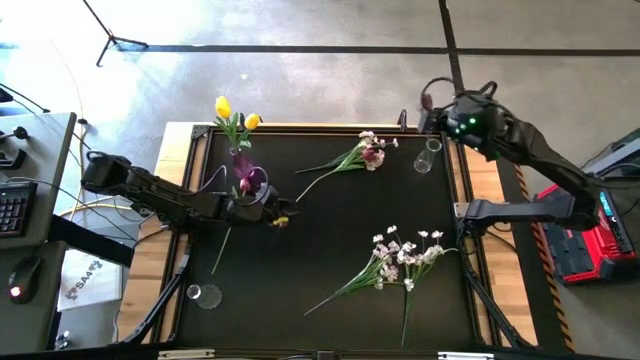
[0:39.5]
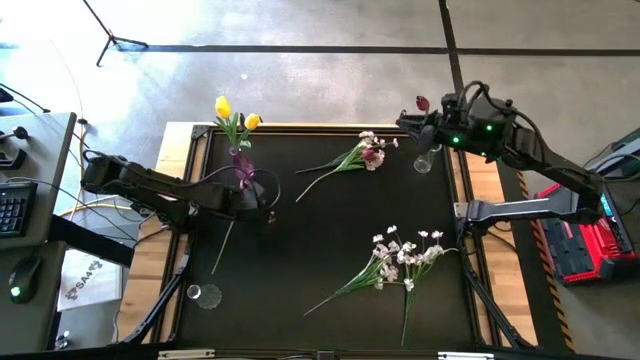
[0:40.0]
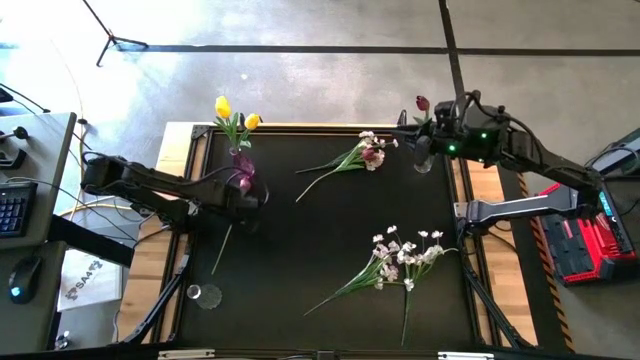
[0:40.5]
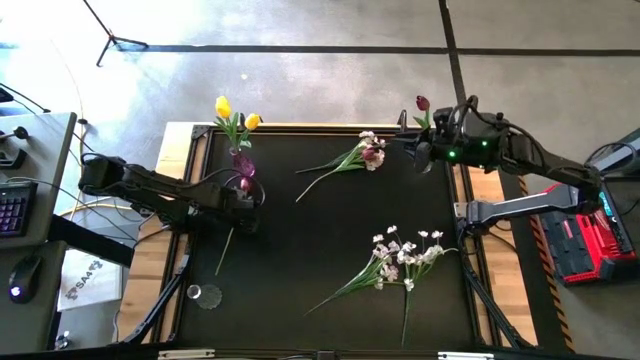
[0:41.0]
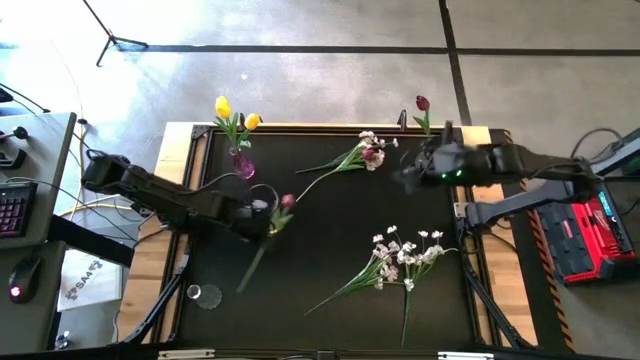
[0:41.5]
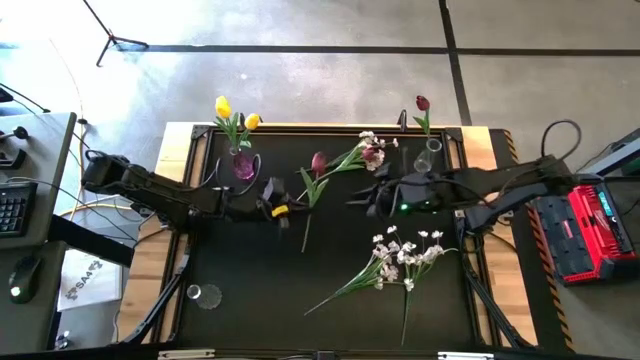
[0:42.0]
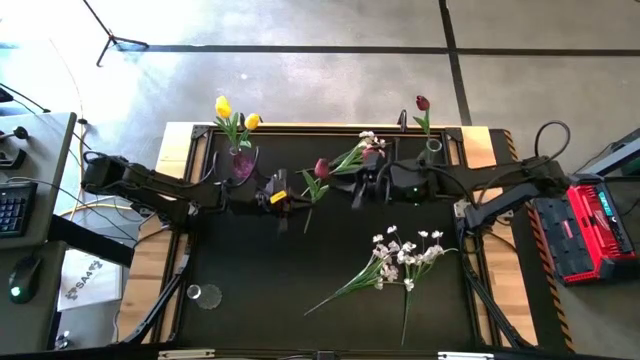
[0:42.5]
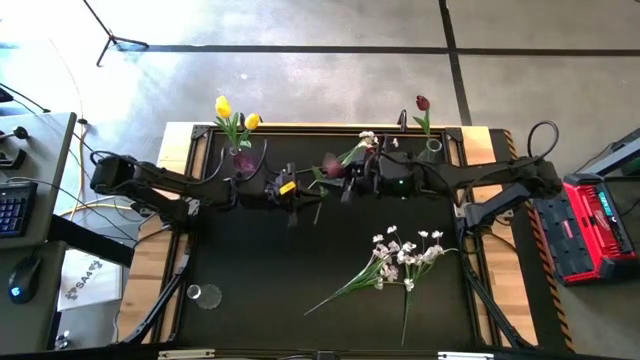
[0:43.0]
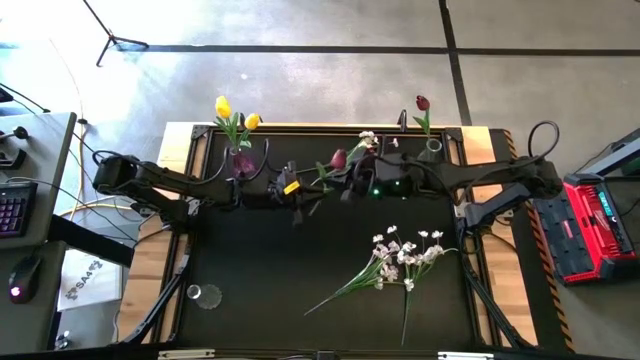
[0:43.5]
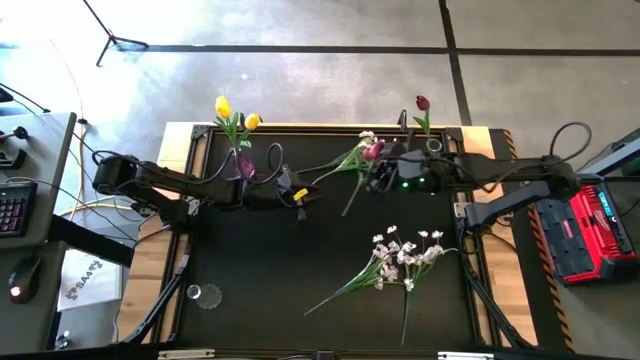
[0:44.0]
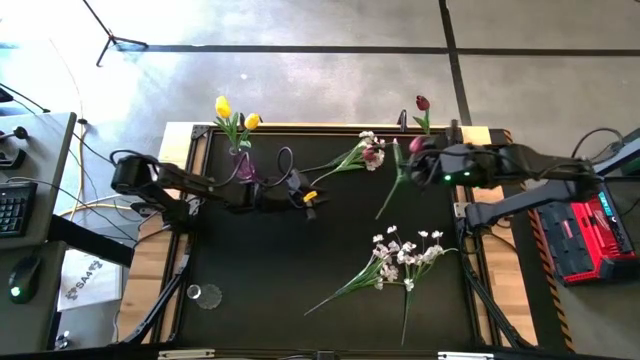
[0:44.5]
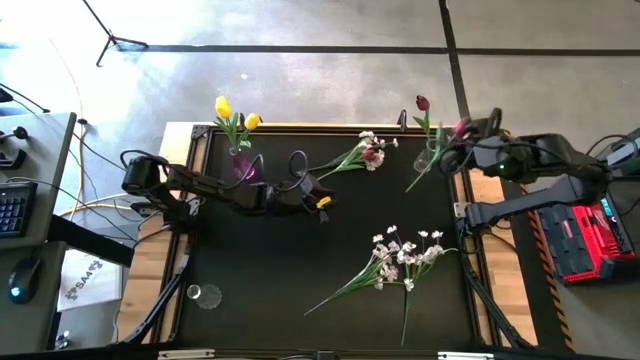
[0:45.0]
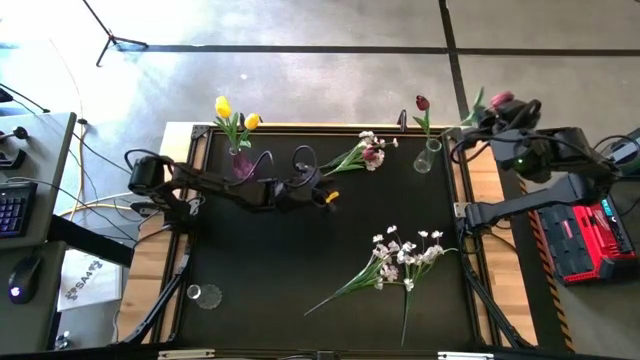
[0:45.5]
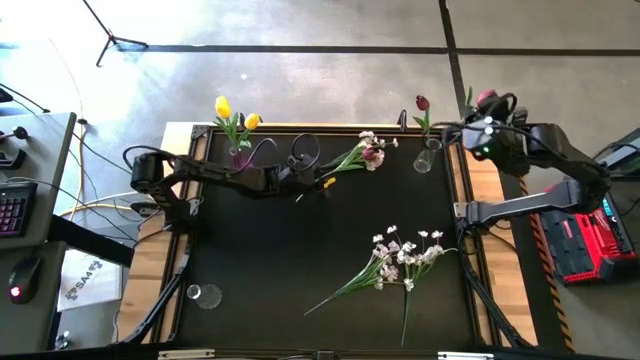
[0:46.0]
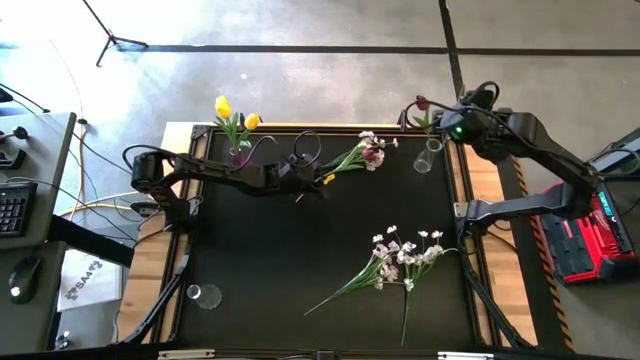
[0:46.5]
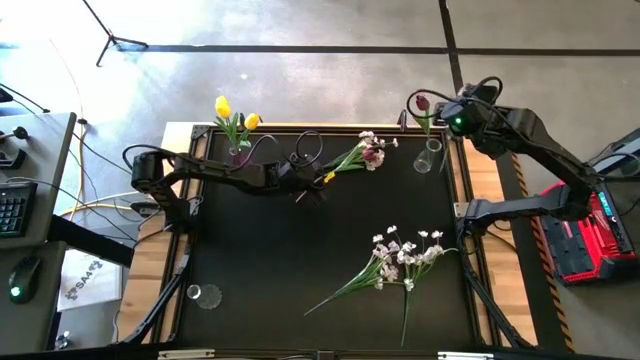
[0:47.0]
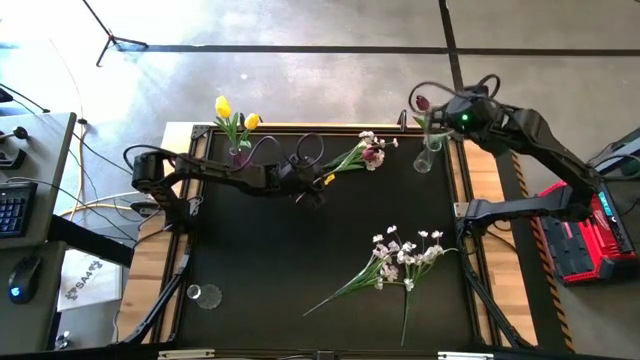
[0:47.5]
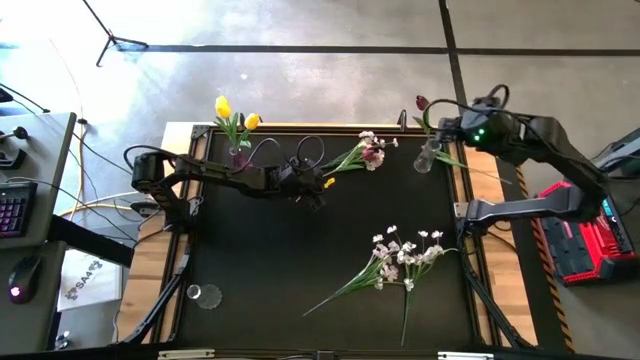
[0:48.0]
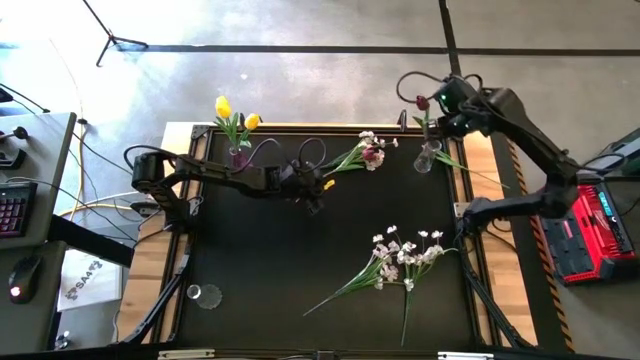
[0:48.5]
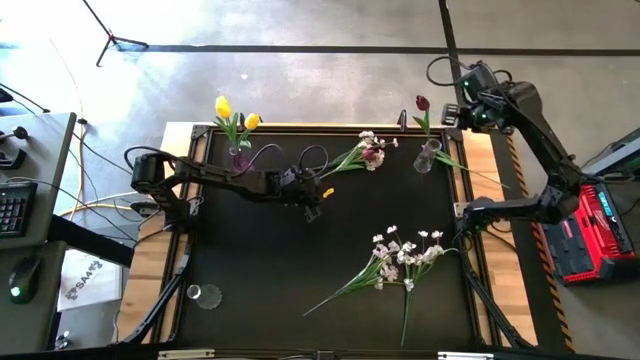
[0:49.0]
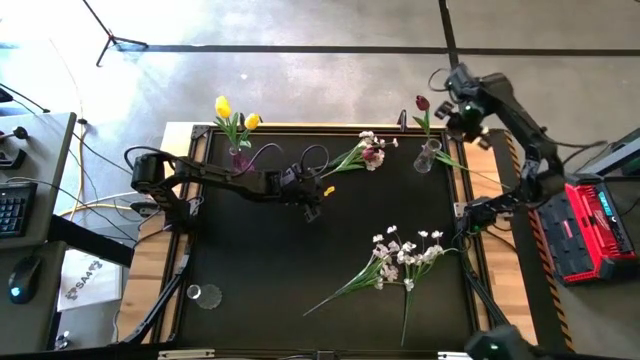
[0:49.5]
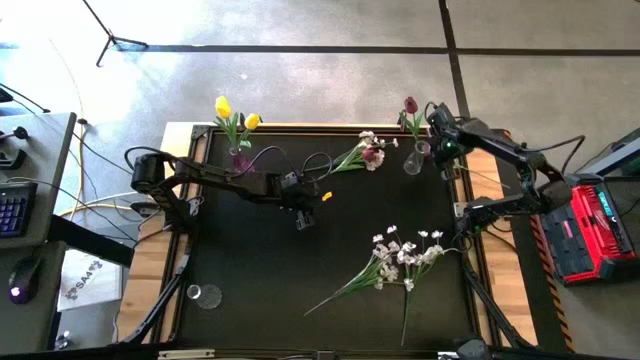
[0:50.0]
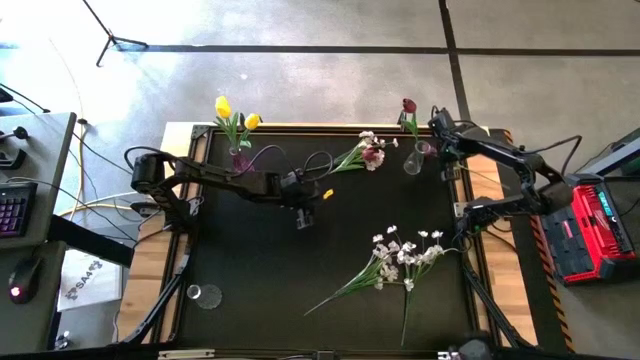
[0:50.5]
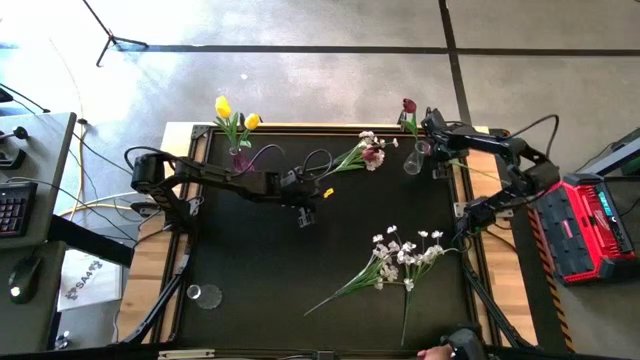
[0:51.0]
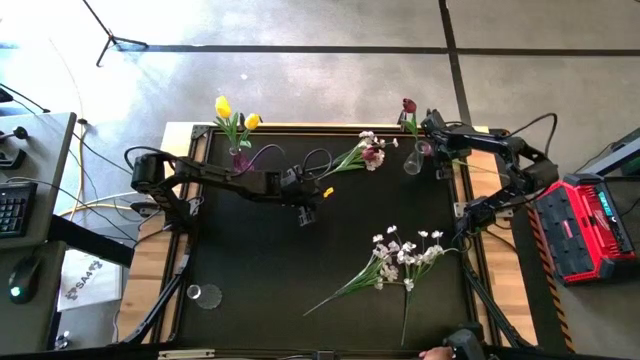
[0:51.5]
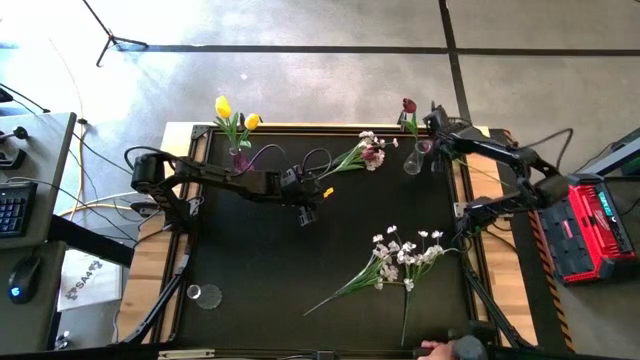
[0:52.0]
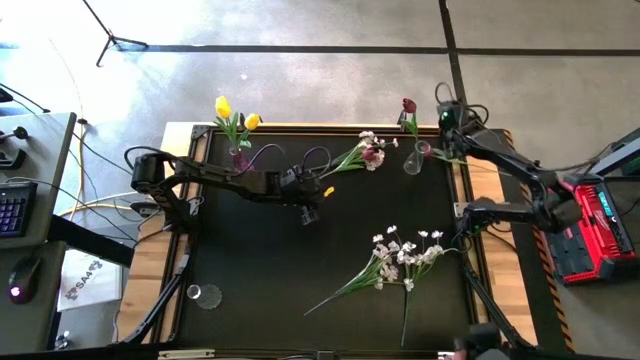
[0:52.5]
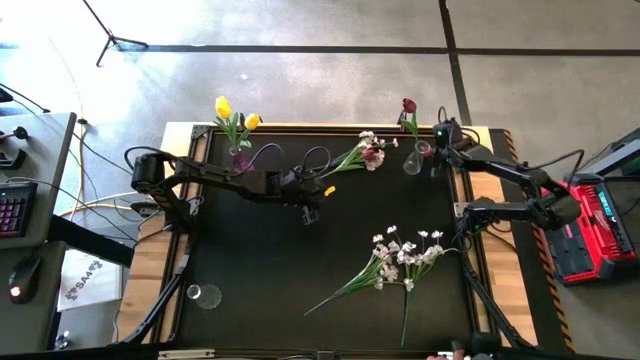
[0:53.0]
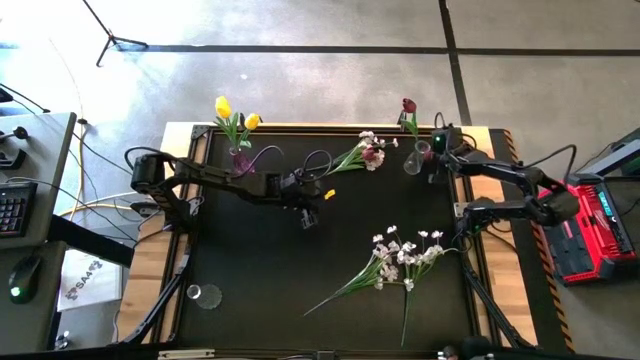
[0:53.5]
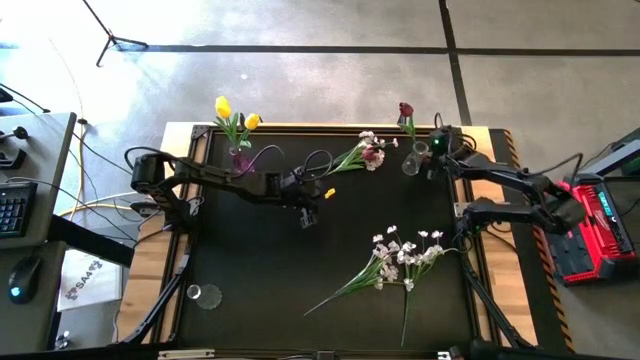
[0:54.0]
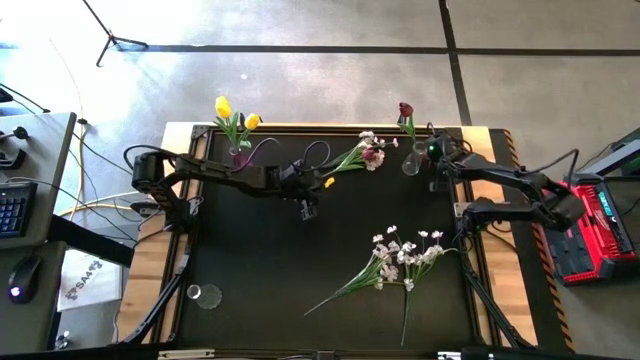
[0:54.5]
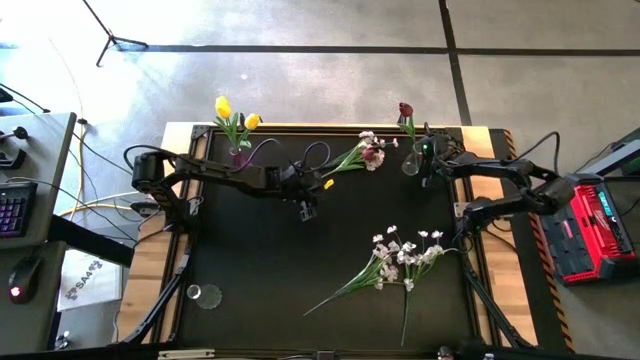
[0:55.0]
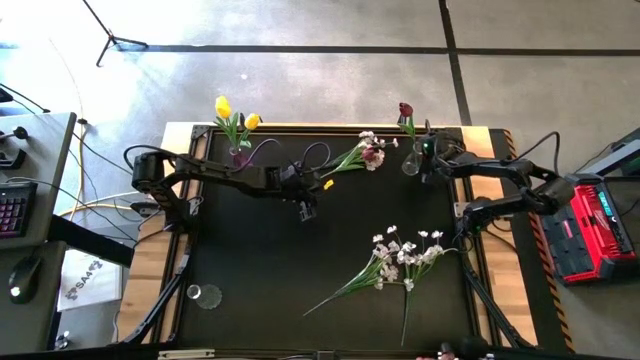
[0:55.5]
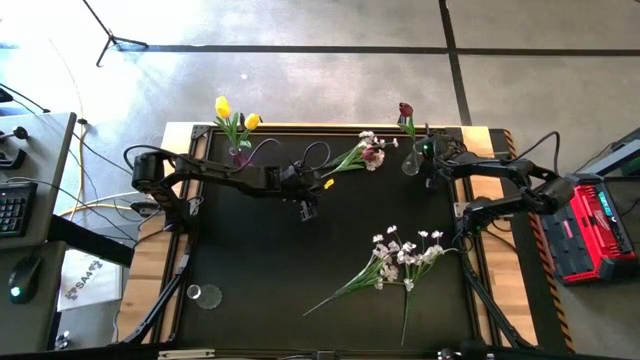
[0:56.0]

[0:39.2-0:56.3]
Task: Sort flowers into vase by color
Put the bottom red flower into the top transparent vase

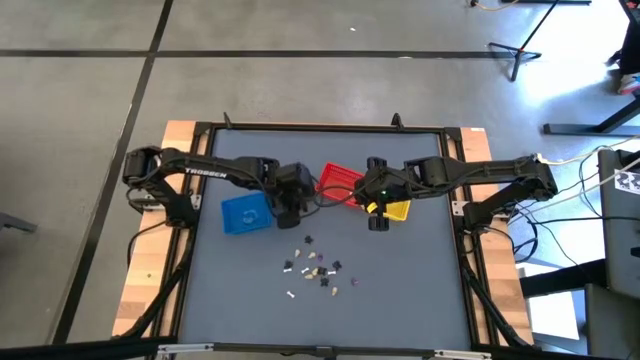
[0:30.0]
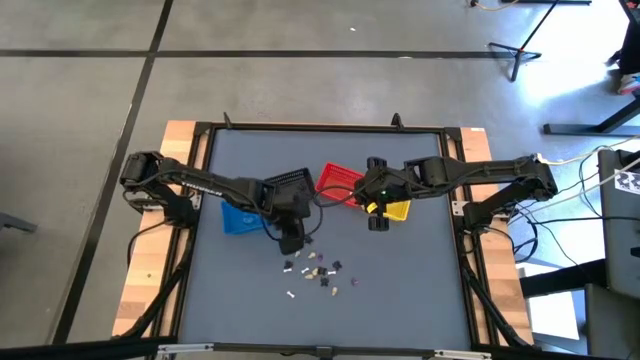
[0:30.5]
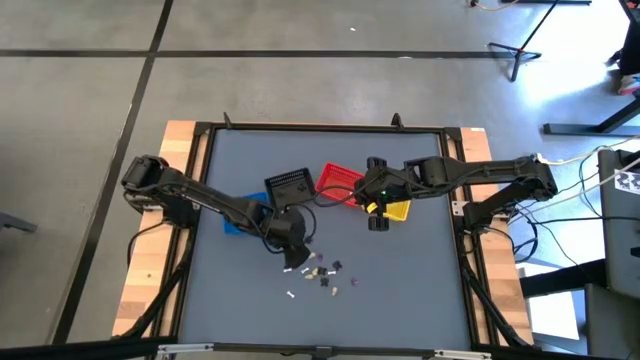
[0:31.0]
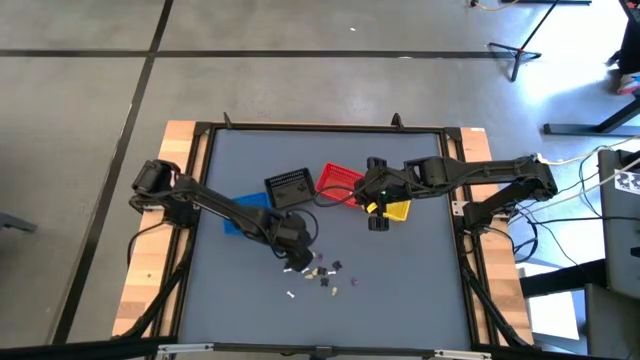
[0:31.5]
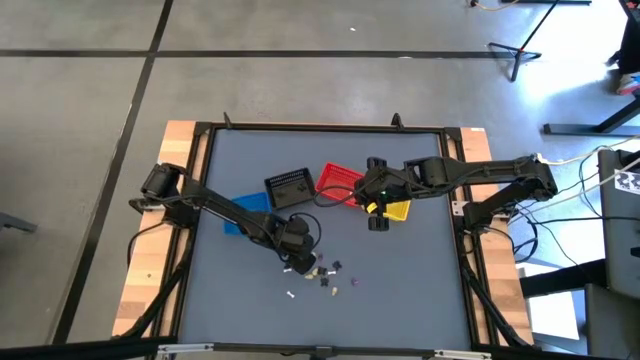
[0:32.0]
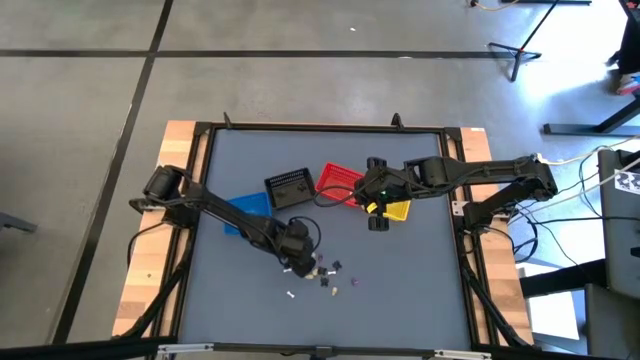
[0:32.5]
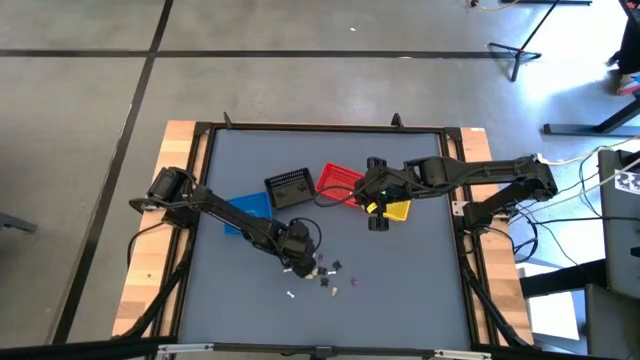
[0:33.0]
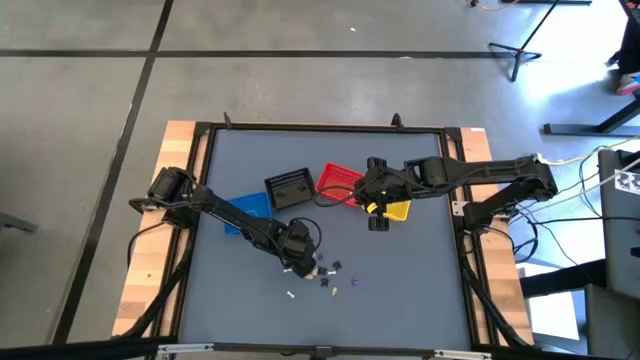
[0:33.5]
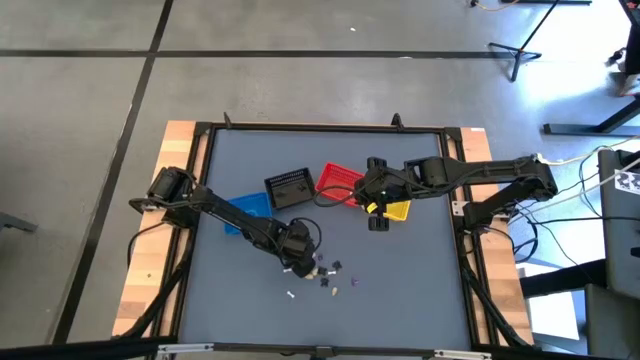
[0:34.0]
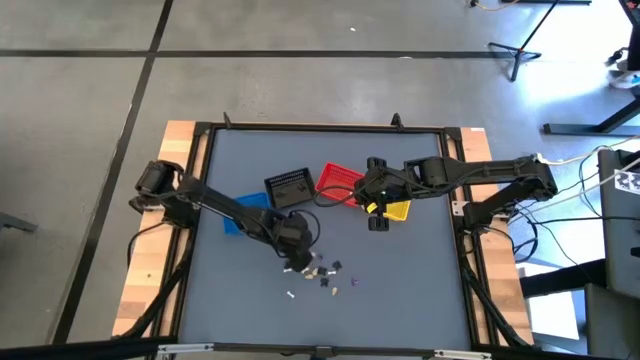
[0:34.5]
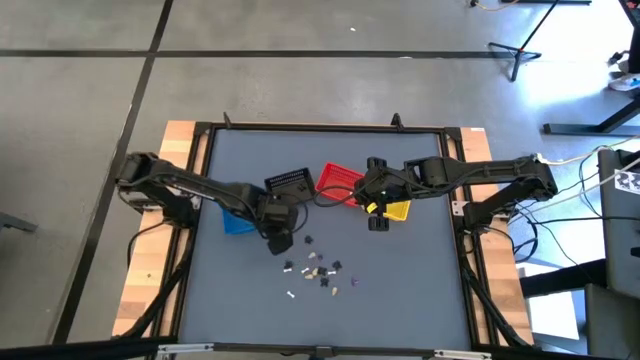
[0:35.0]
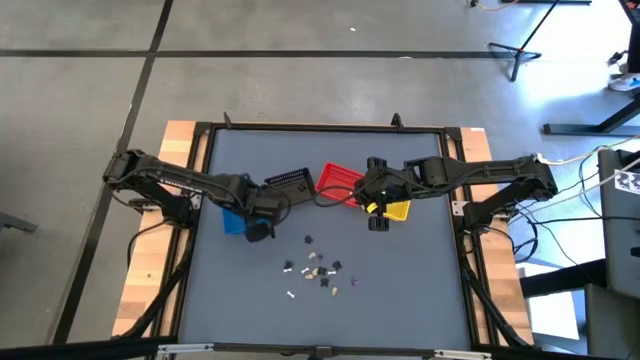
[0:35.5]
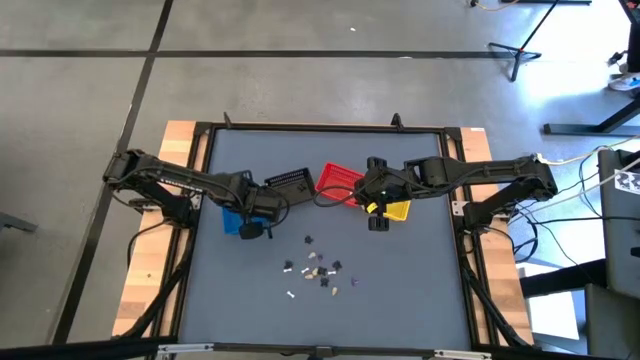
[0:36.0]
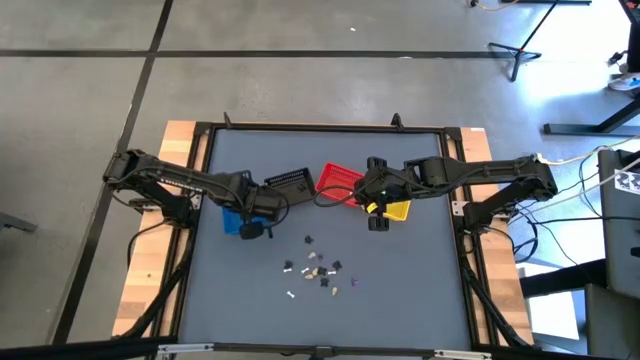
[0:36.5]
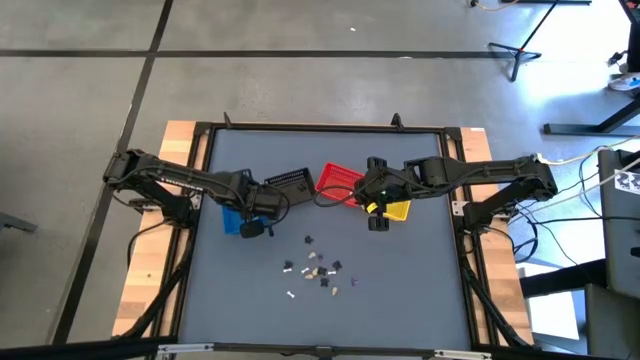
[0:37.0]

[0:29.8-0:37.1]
Task: Sort Halloween decoration
Put the yellow skull toy into the blue bin
